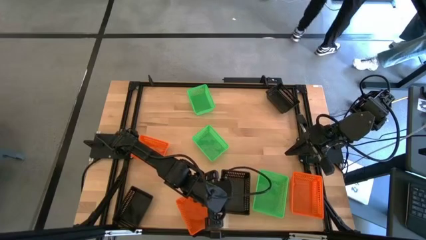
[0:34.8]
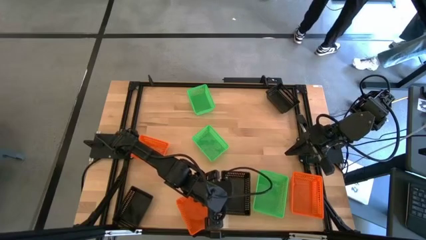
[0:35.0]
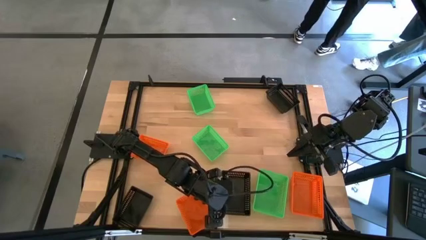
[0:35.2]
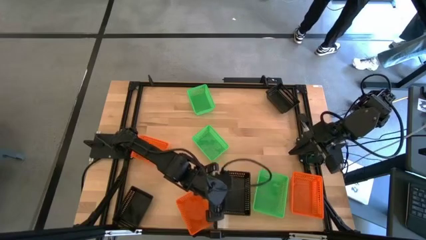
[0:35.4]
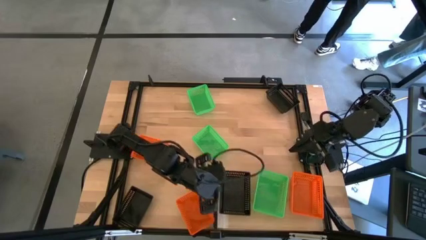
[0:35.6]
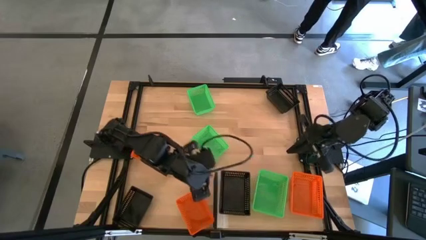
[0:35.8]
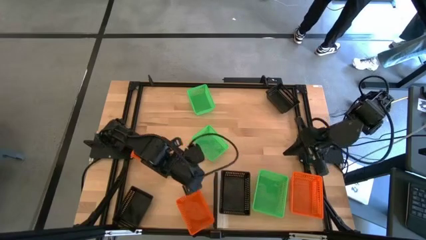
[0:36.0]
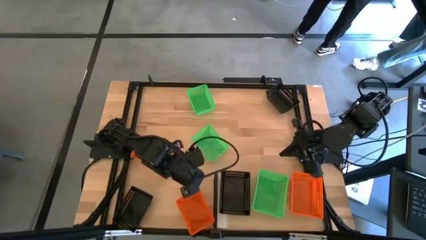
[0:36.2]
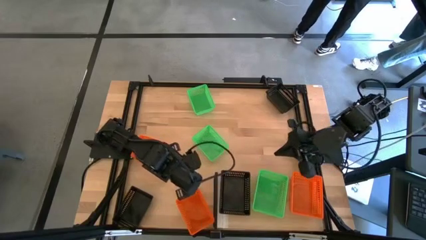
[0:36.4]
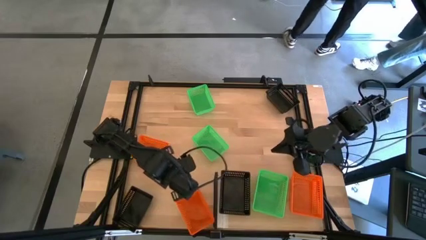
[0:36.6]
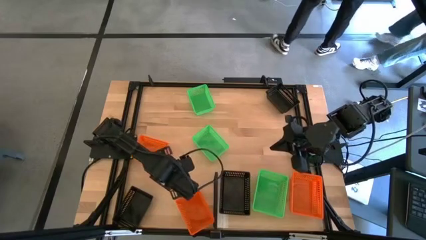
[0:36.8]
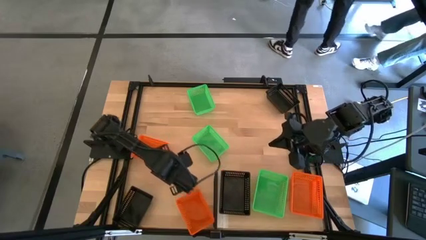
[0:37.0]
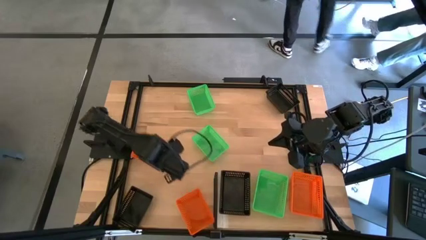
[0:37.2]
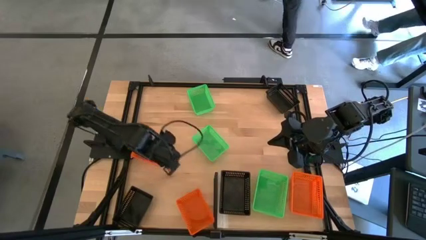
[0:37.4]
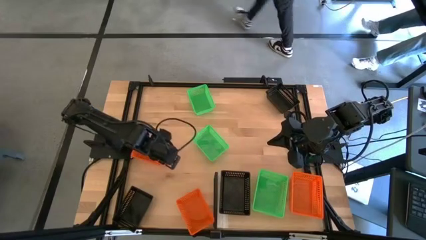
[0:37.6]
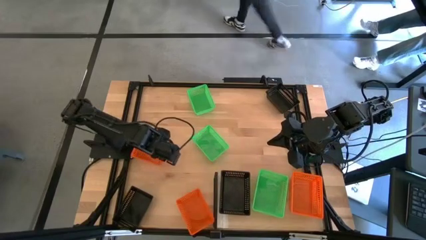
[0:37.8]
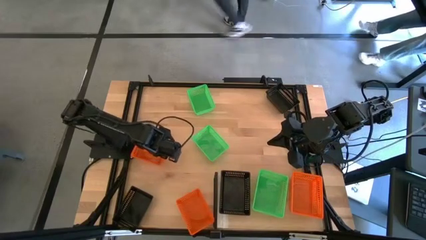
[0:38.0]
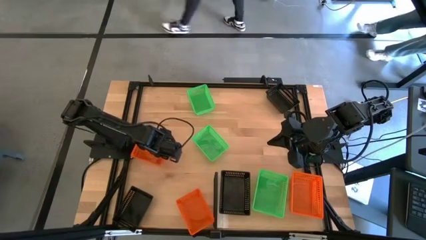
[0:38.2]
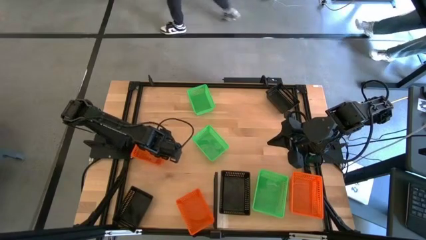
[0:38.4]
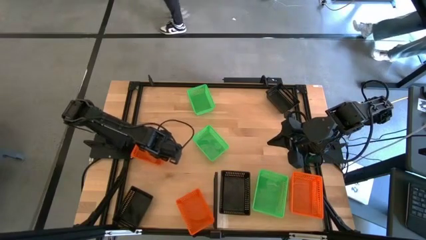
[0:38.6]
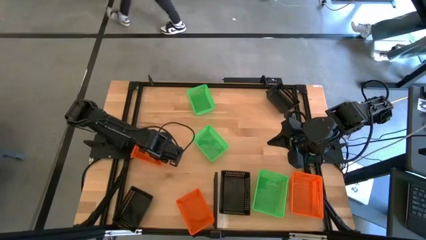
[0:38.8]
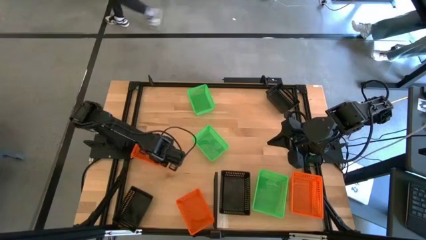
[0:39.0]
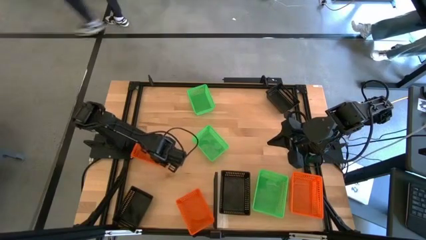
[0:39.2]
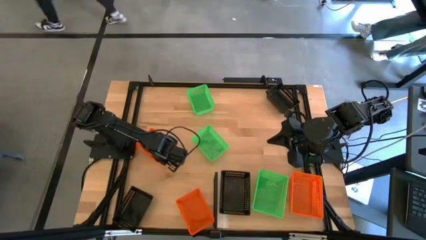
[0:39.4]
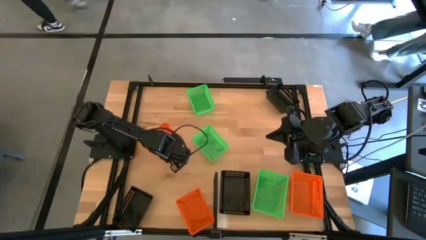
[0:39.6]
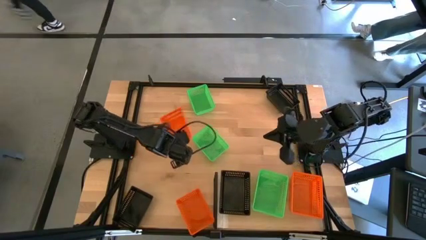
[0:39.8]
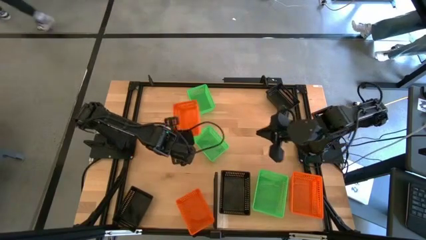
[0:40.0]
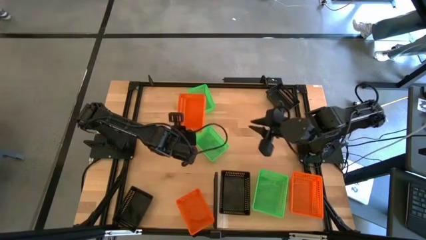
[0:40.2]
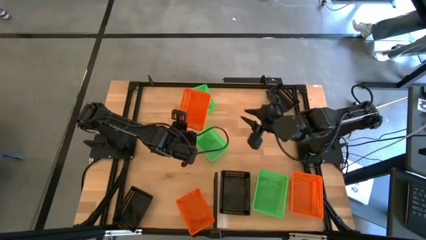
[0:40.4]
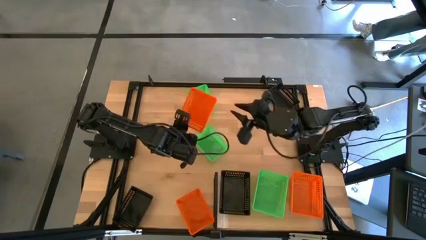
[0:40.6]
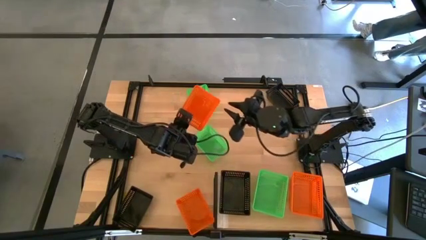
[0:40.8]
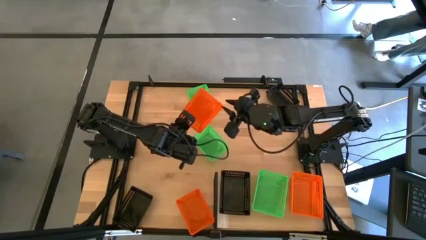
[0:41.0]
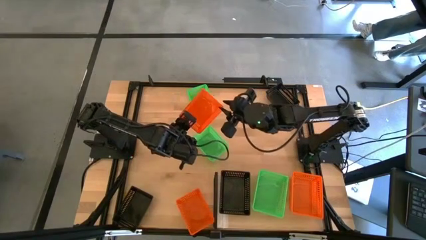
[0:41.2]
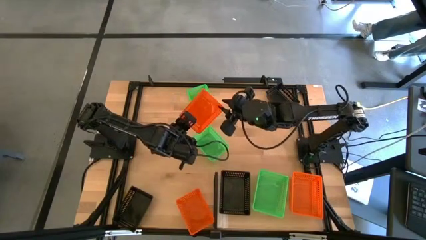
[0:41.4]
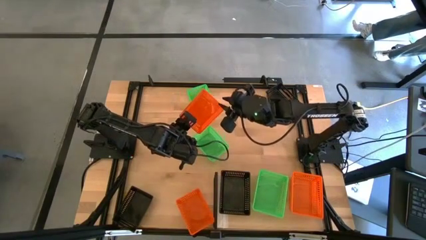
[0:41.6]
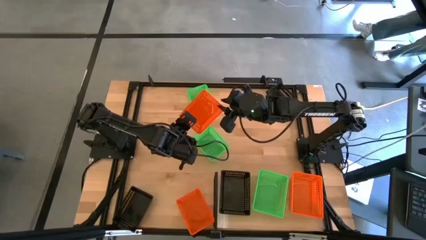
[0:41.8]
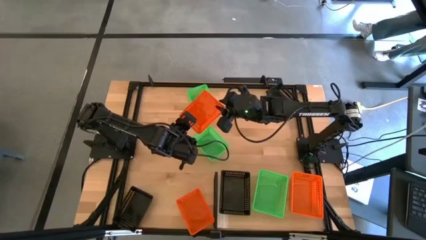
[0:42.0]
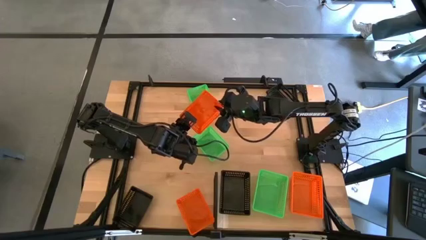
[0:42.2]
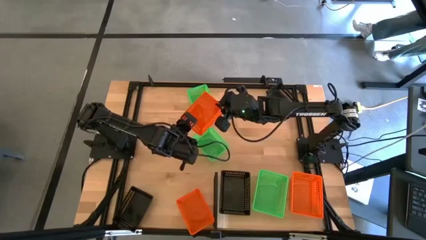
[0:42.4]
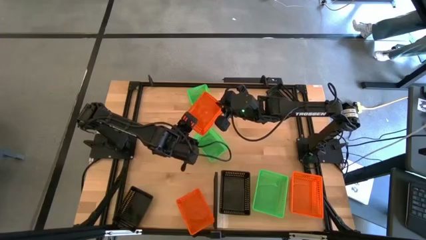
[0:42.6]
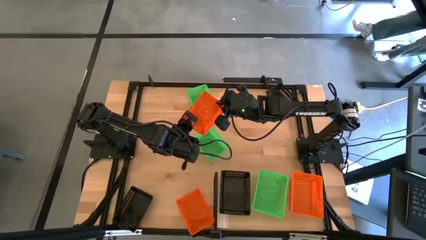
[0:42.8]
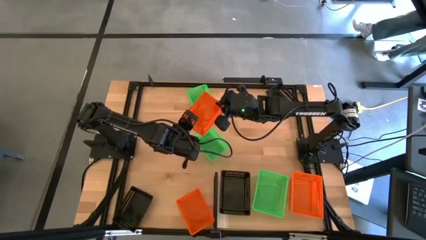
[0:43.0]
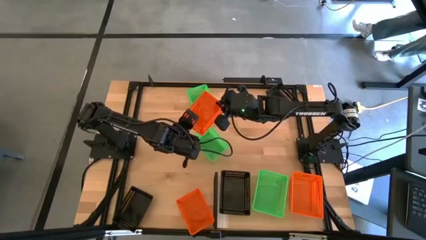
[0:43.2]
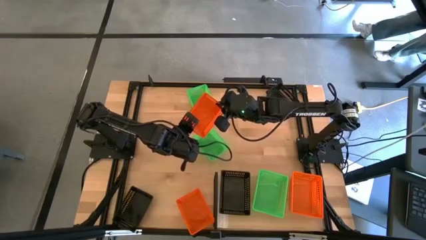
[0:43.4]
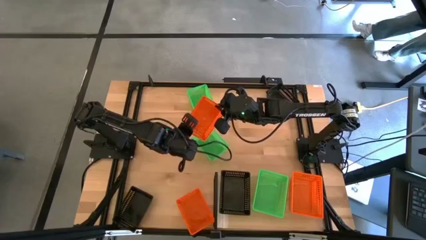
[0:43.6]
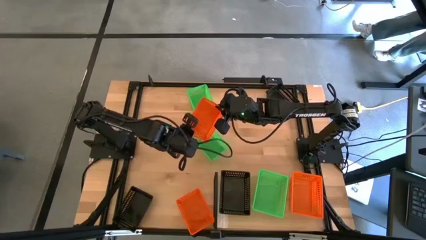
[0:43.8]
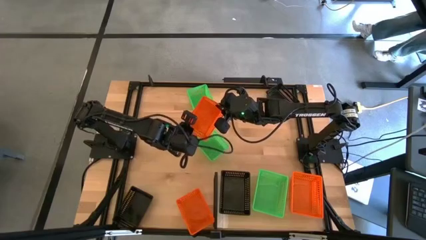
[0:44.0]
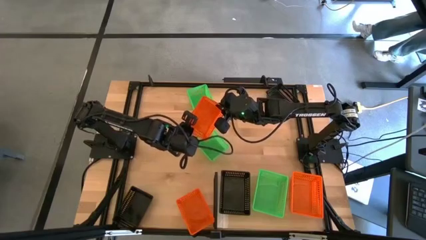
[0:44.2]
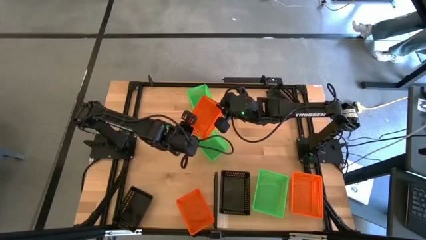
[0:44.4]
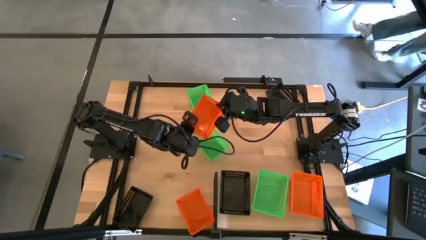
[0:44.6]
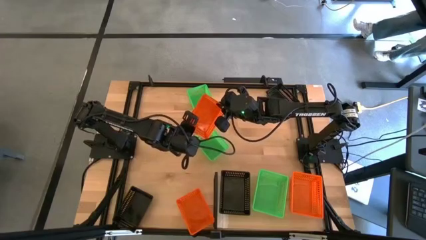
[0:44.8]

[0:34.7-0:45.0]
Task: Stack baskets on shelf by color
Stack the top orange bin on the orange bin on the shelf

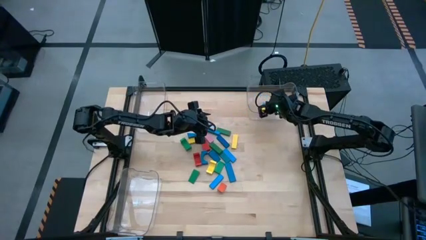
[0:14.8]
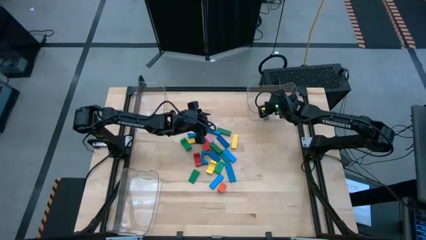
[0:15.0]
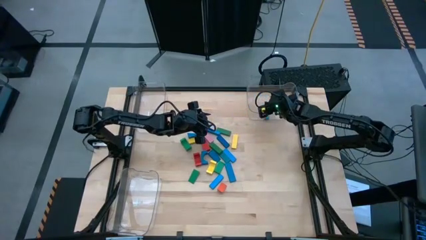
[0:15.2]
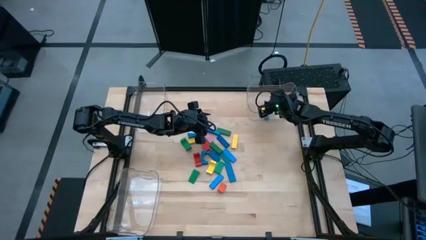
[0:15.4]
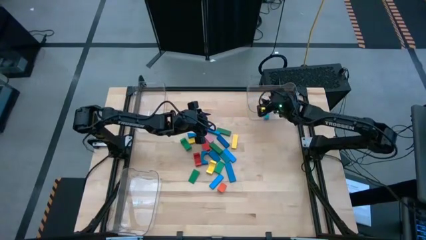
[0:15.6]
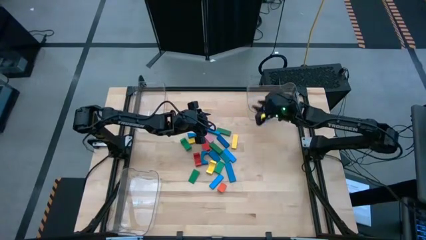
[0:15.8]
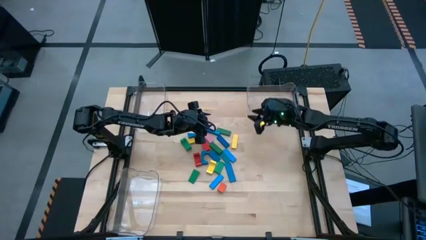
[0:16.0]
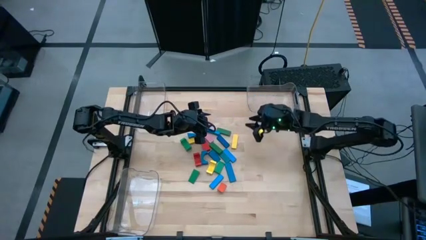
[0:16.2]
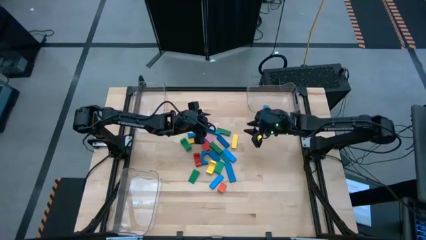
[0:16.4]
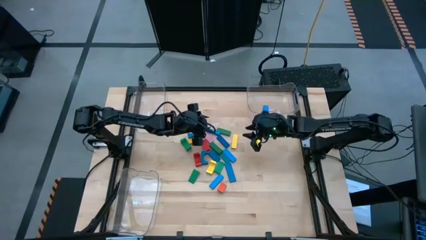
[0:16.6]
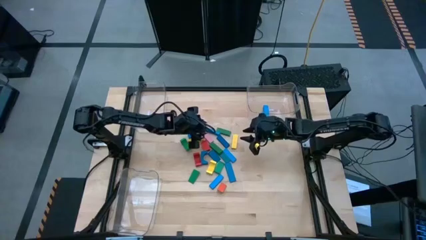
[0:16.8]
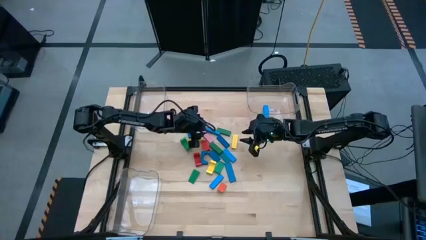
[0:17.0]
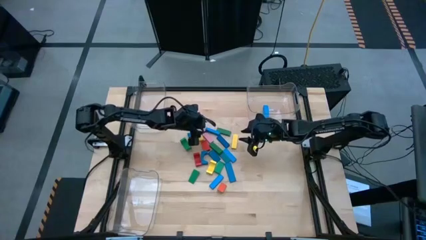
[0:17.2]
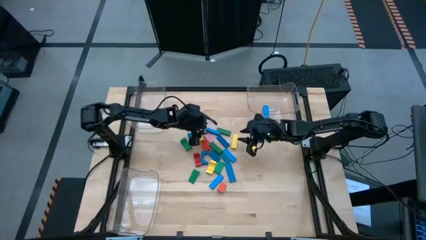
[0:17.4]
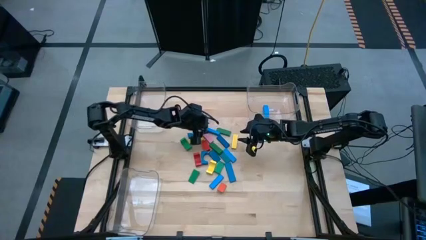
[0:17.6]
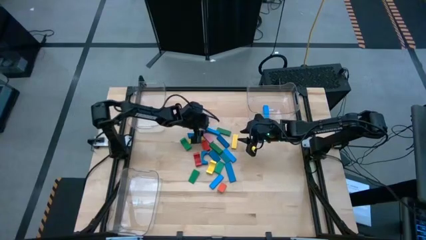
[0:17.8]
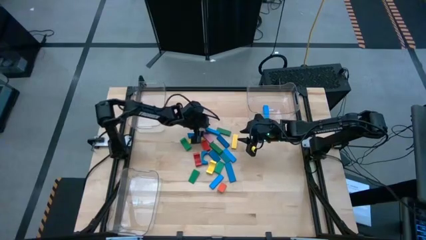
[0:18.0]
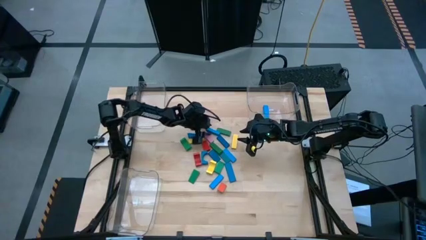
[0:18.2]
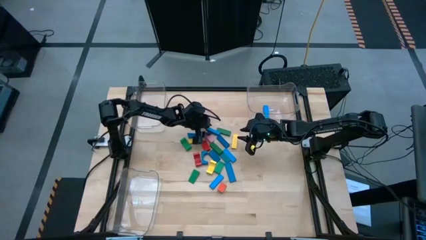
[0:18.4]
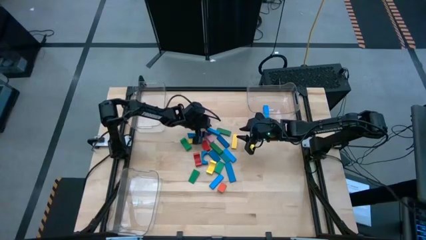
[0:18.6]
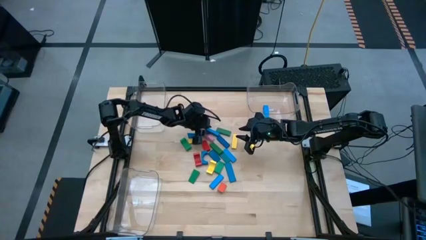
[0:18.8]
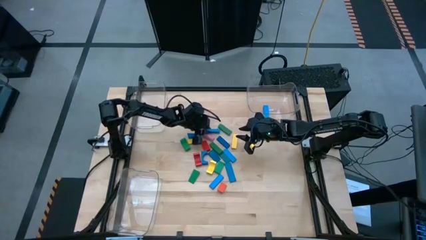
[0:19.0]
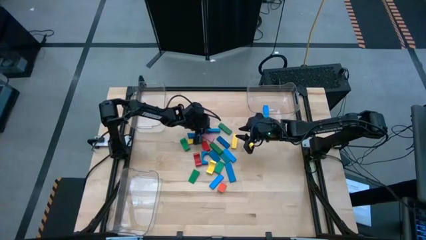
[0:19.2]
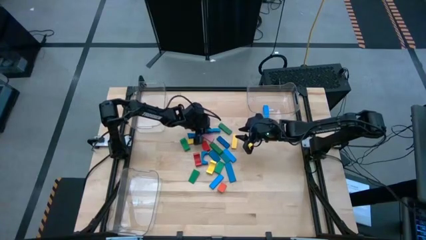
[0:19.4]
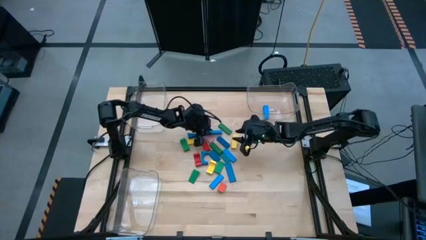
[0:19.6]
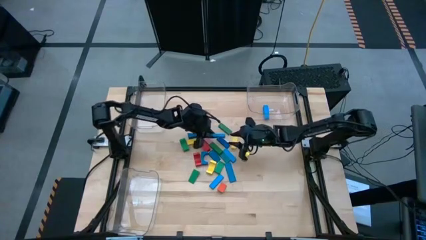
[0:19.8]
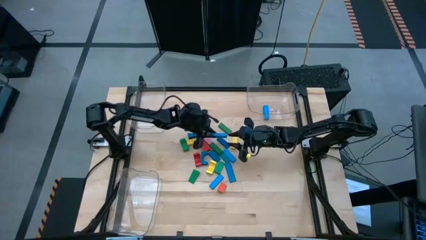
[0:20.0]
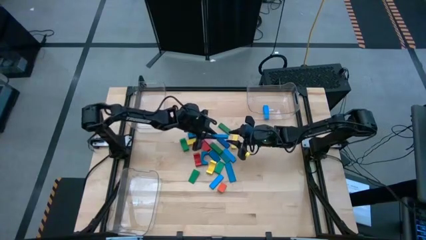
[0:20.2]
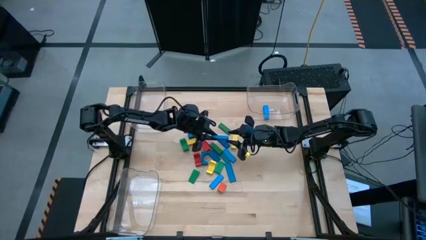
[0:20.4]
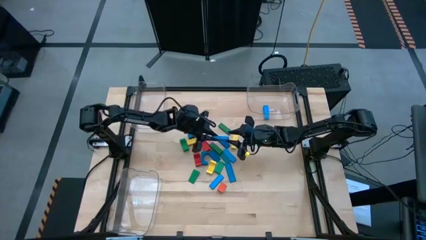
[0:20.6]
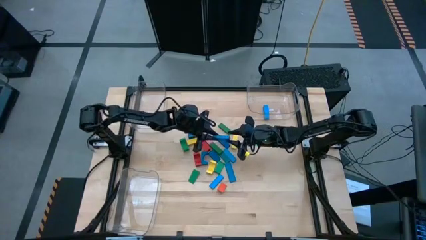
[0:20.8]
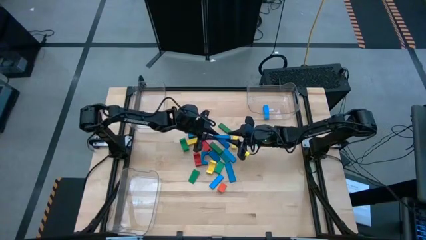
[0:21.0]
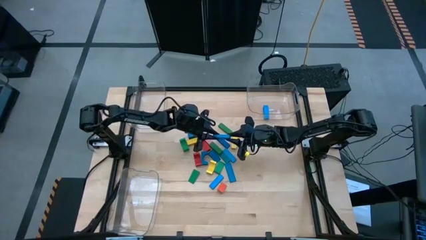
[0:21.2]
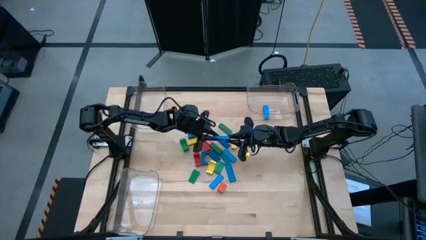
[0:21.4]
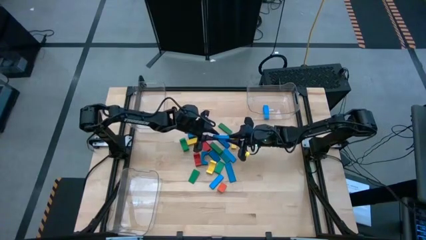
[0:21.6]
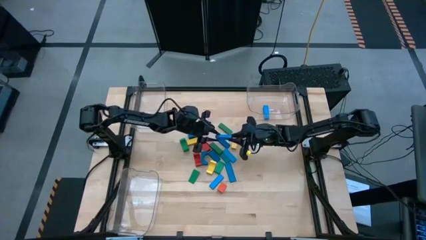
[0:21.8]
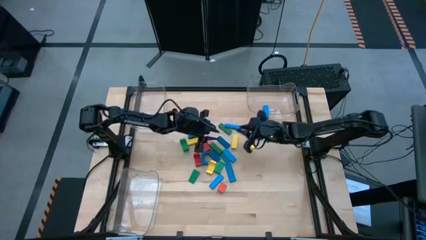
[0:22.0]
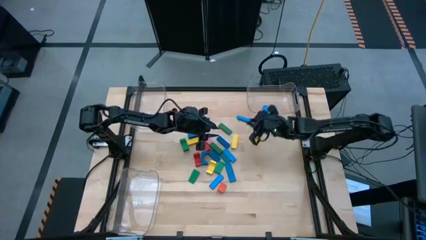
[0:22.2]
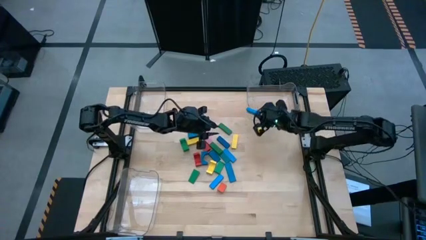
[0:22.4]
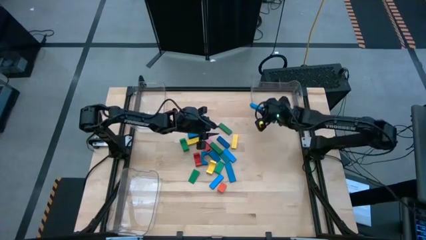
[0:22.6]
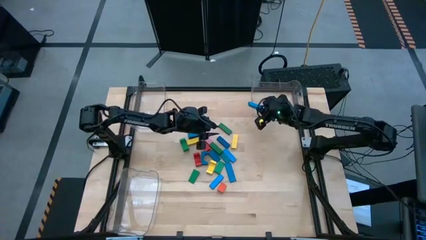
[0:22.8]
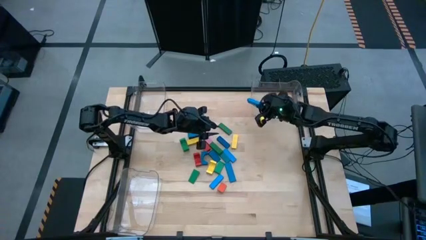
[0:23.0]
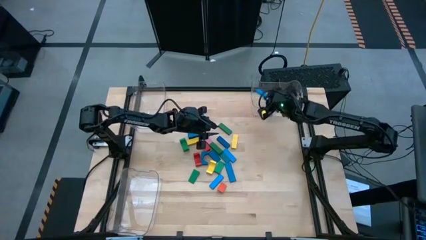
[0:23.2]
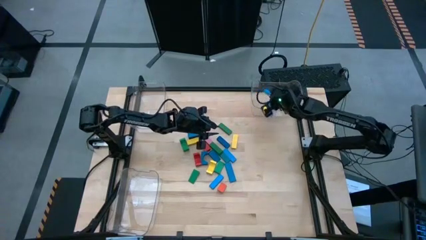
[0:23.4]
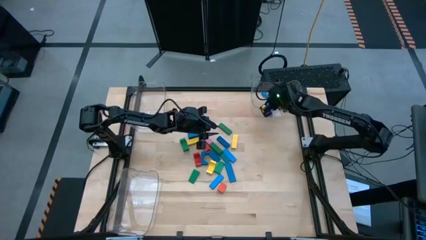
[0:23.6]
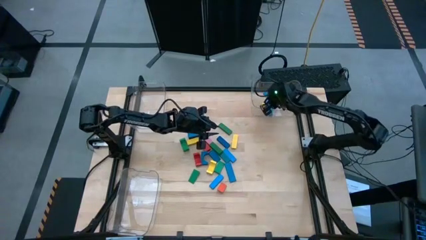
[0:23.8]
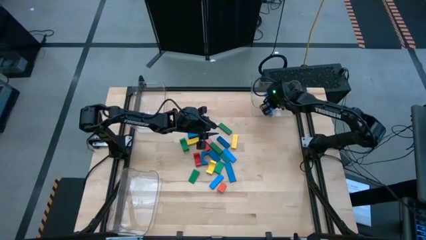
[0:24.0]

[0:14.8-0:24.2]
Task: Sort blocks by size
Put the blue rectangular block into the top right transparent bin
